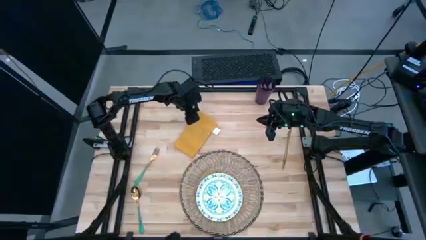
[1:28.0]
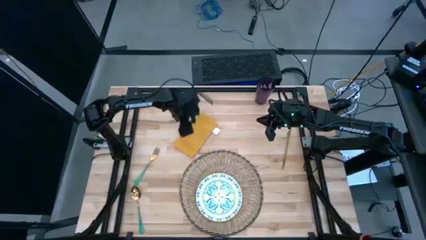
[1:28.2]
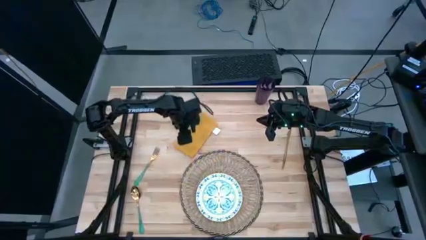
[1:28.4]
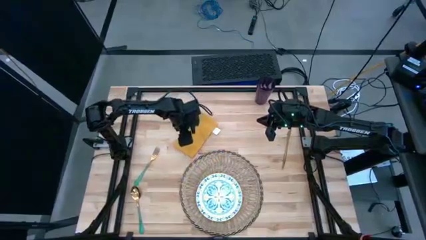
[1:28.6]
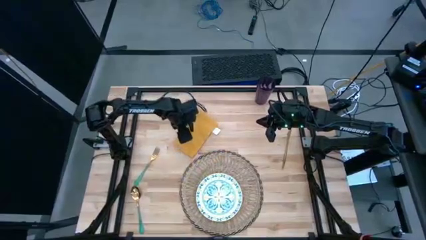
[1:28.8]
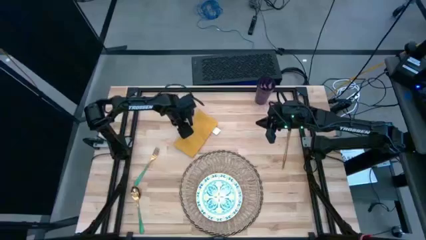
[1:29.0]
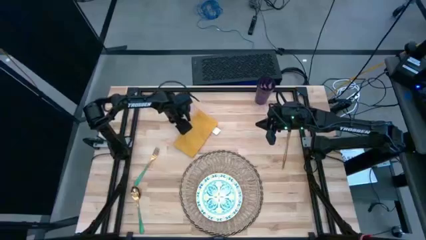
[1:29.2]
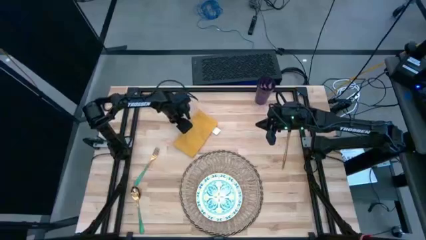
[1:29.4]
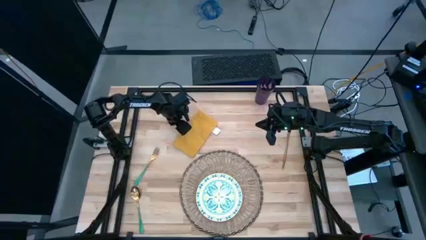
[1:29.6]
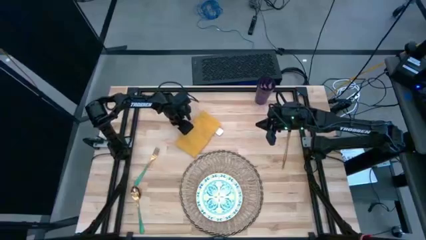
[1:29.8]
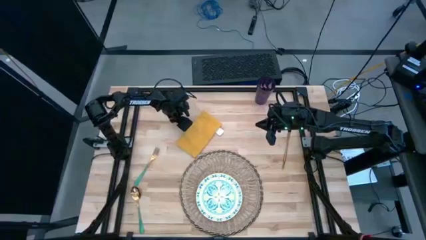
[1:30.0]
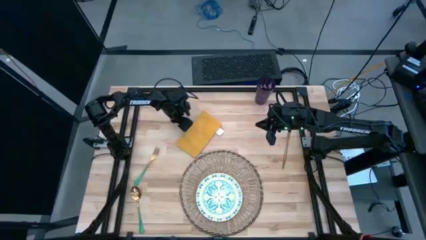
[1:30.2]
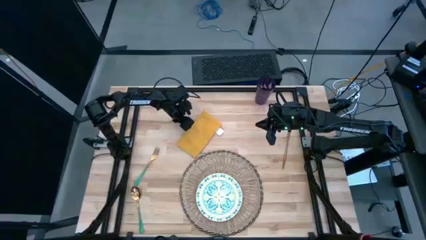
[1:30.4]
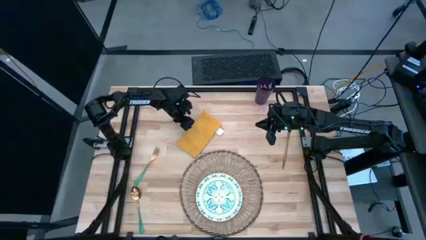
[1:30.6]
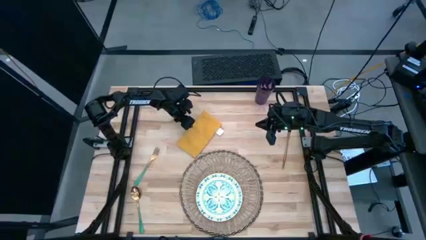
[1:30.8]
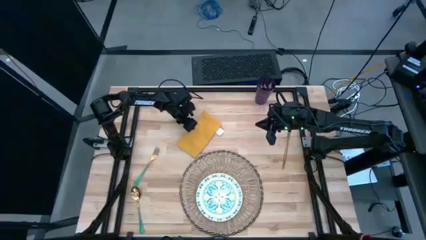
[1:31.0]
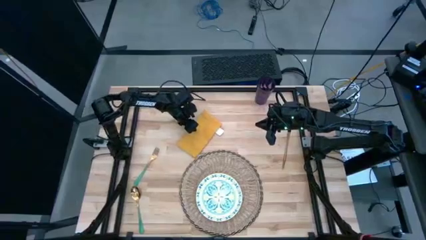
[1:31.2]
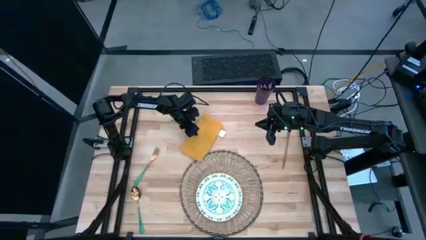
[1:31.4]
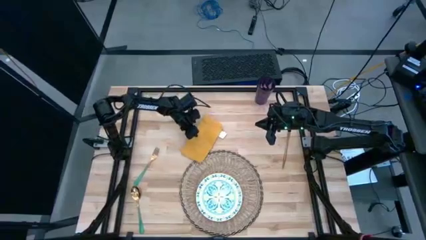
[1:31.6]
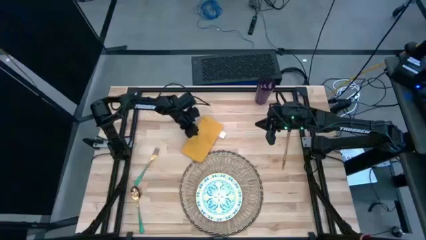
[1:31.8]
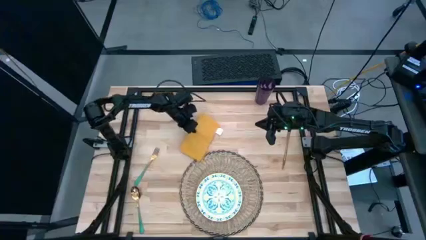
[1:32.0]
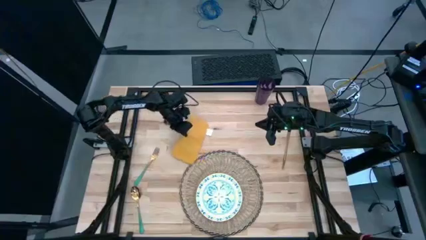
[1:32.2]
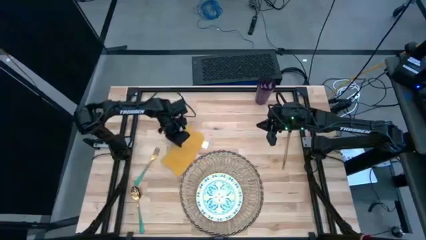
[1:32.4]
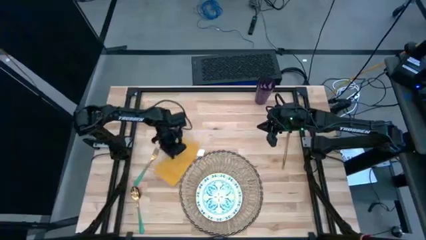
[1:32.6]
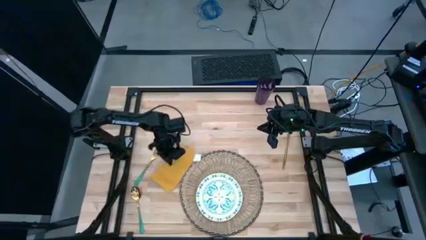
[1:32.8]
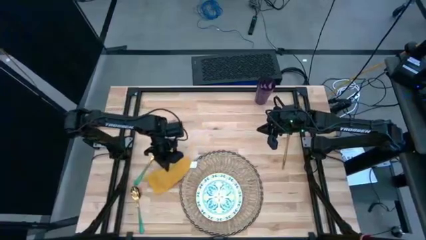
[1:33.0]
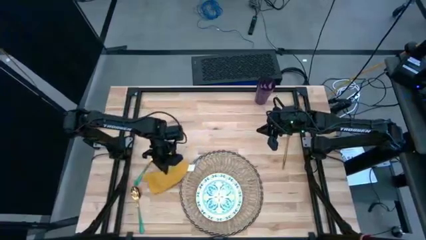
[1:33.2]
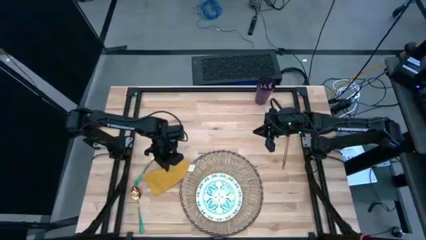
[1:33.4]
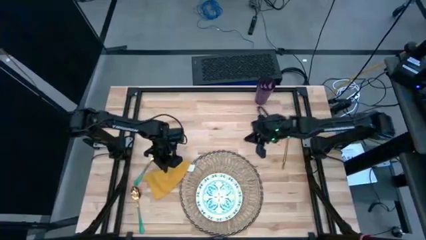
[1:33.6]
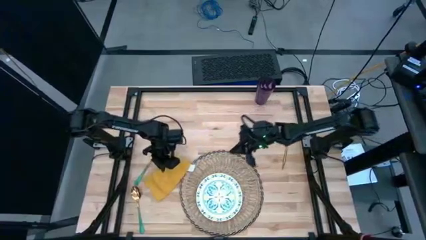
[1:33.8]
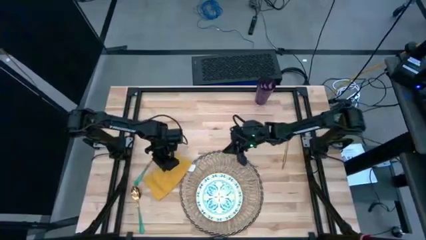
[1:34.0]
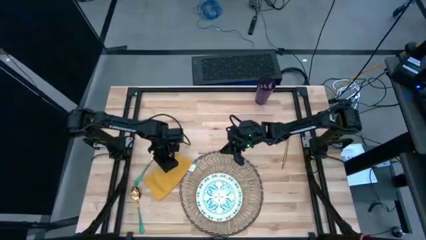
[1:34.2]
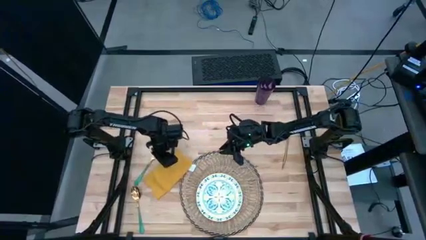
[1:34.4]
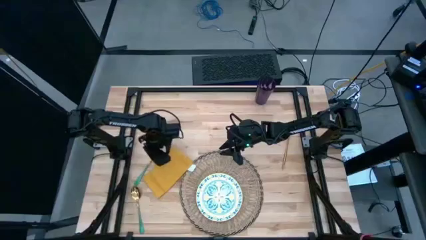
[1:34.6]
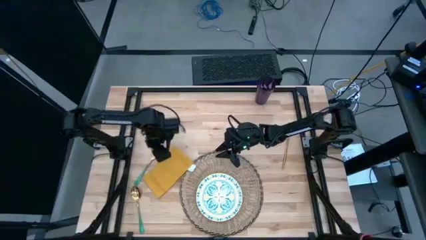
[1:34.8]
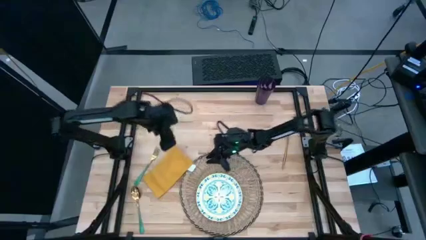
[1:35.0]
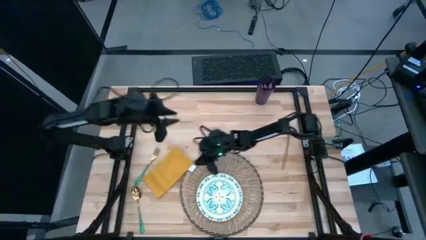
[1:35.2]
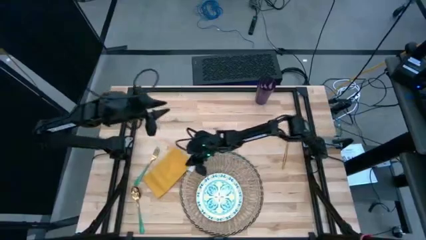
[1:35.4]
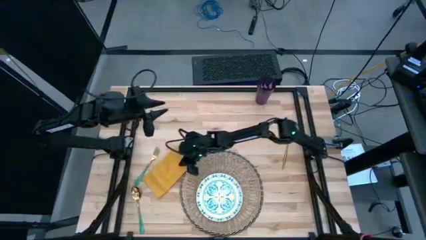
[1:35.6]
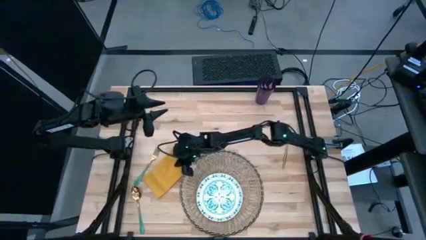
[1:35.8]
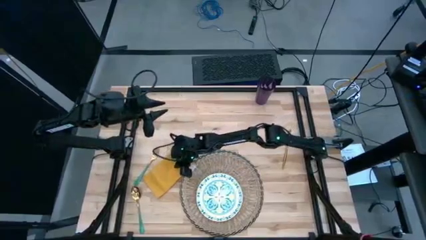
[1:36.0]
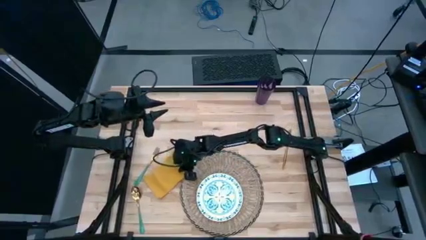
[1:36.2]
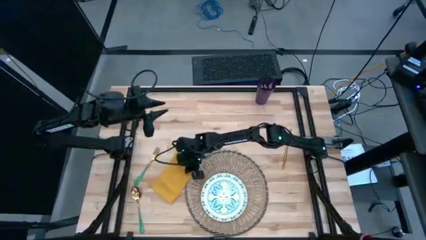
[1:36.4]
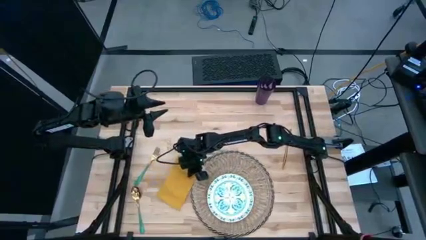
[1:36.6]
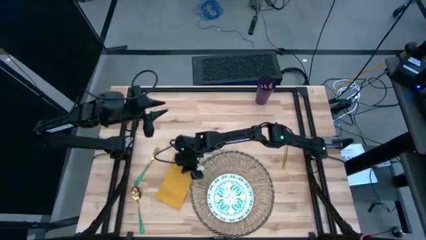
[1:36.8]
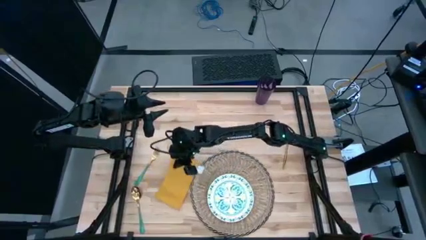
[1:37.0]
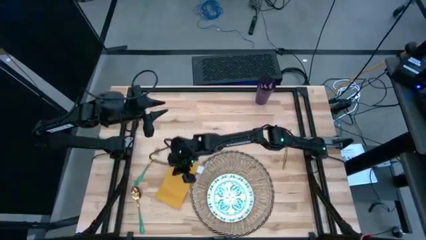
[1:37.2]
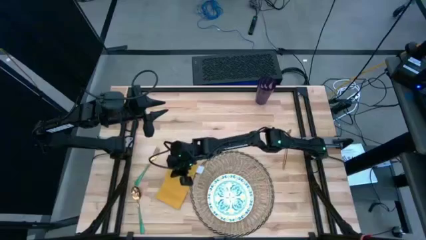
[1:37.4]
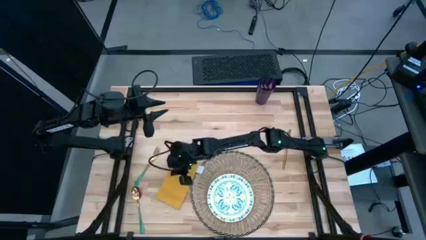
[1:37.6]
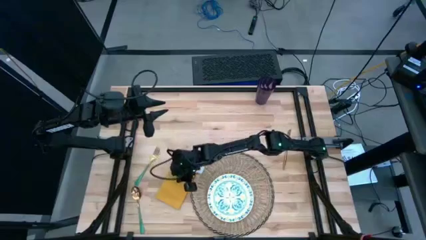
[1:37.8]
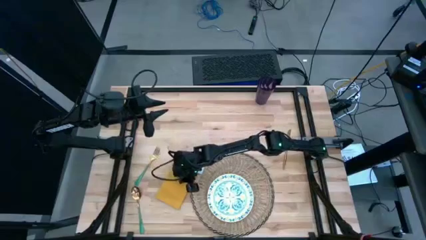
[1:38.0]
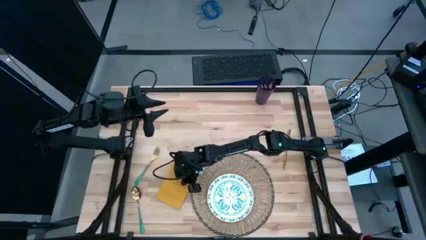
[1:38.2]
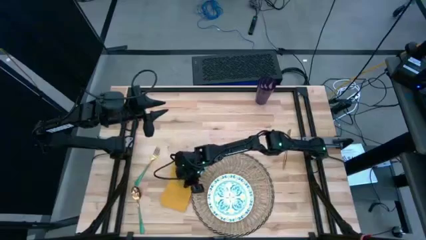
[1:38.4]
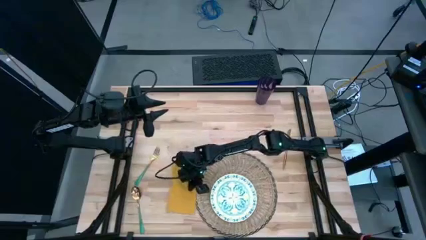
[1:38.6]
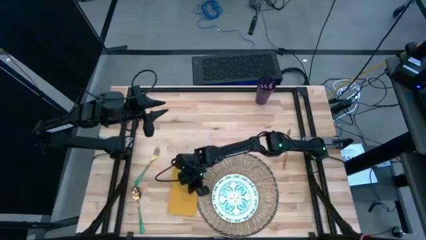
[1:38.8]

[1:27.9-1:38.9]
Task: Set table place
Move the folded yellow table napkin to the left of the brown placemat

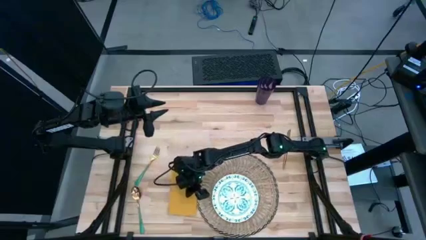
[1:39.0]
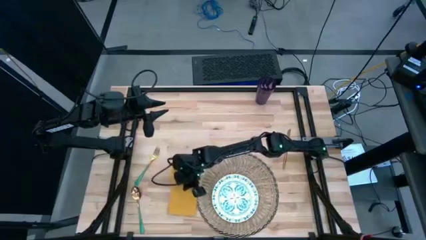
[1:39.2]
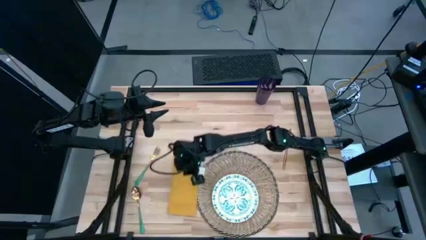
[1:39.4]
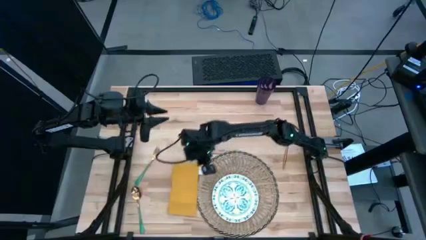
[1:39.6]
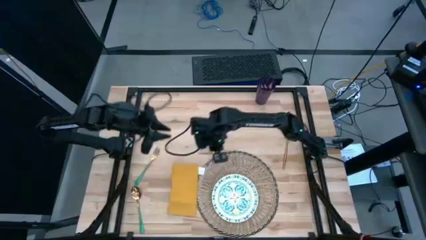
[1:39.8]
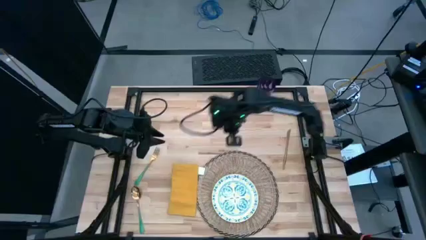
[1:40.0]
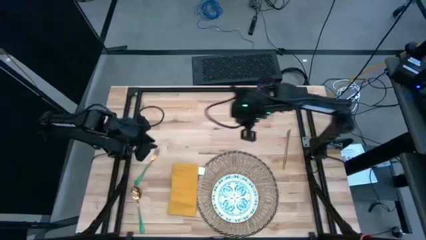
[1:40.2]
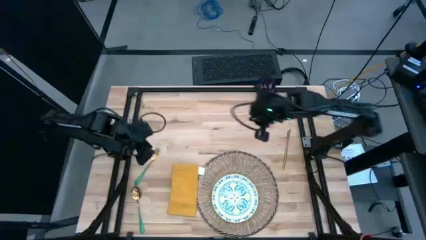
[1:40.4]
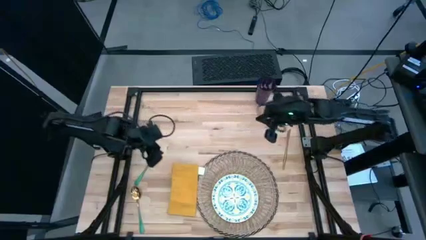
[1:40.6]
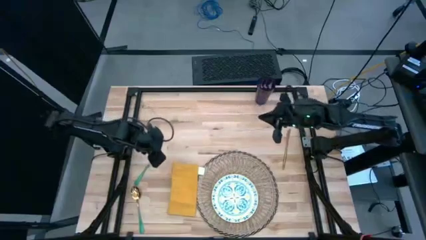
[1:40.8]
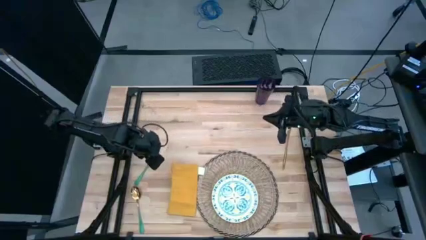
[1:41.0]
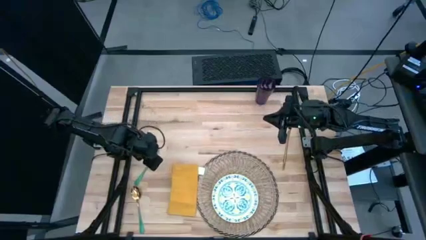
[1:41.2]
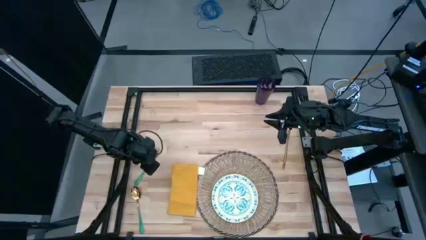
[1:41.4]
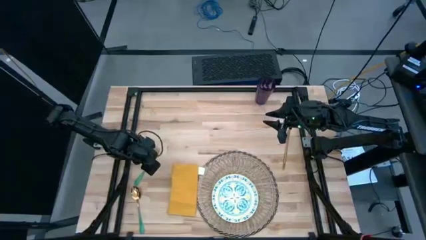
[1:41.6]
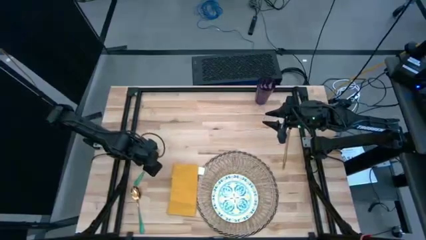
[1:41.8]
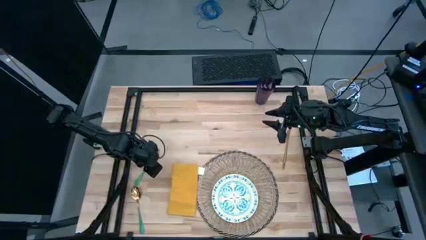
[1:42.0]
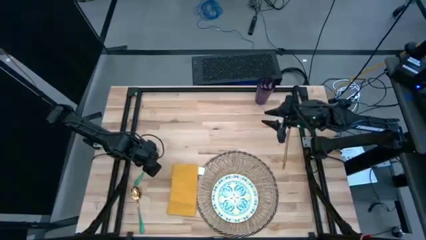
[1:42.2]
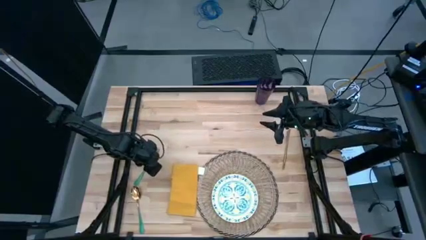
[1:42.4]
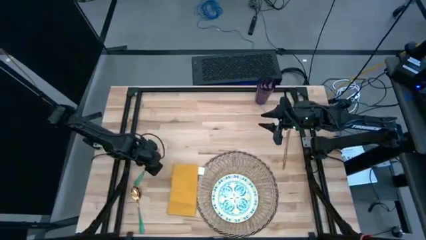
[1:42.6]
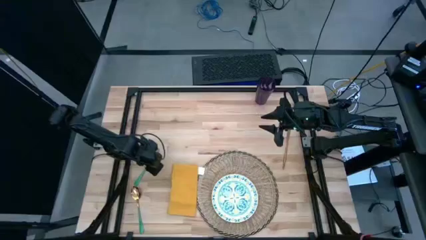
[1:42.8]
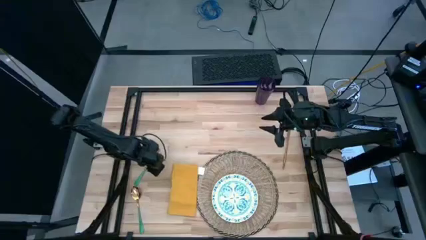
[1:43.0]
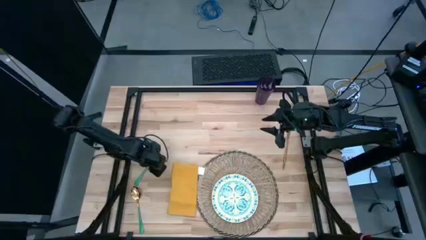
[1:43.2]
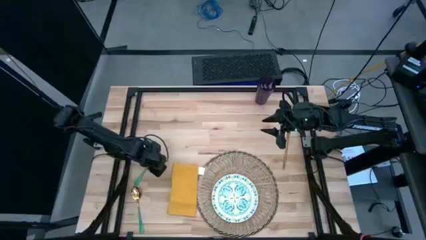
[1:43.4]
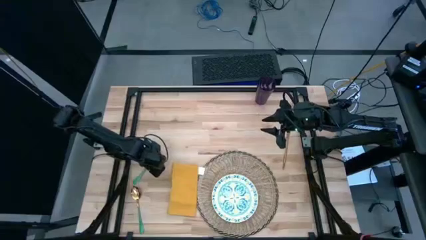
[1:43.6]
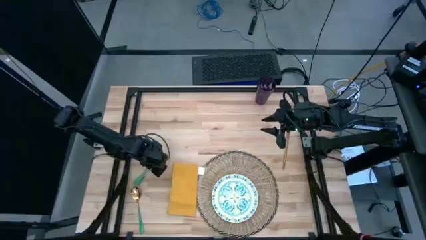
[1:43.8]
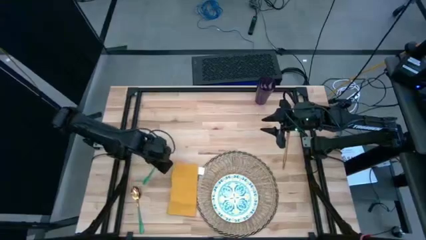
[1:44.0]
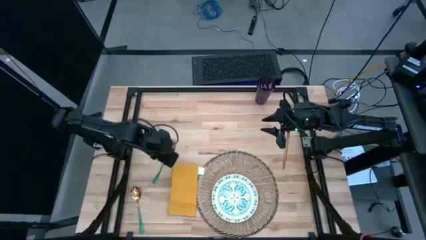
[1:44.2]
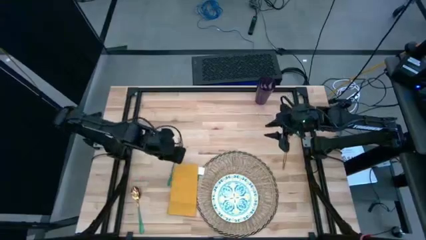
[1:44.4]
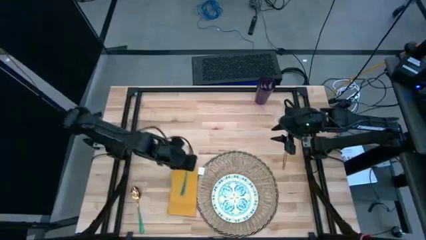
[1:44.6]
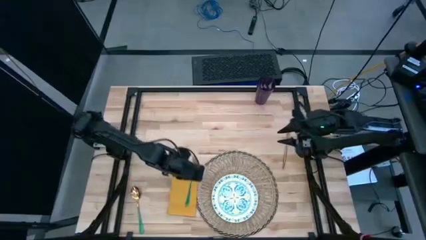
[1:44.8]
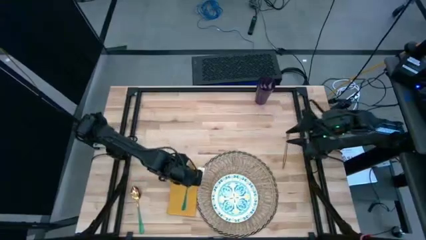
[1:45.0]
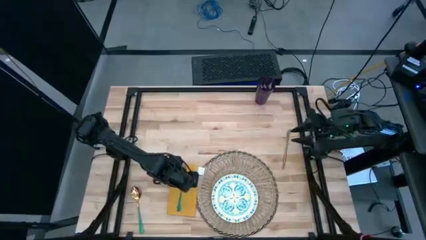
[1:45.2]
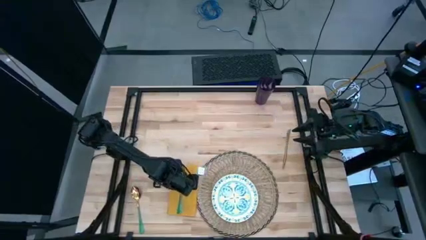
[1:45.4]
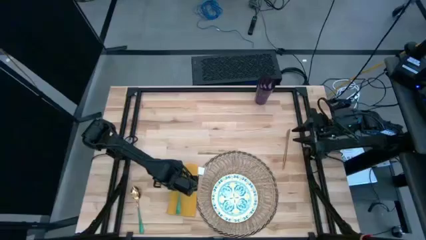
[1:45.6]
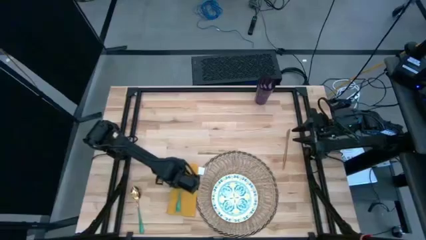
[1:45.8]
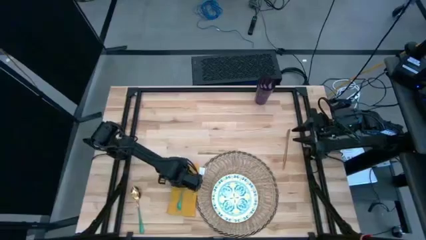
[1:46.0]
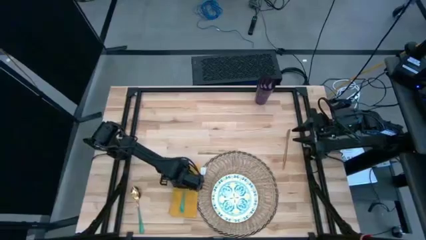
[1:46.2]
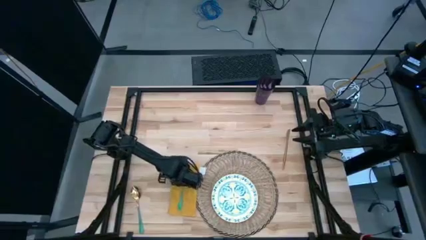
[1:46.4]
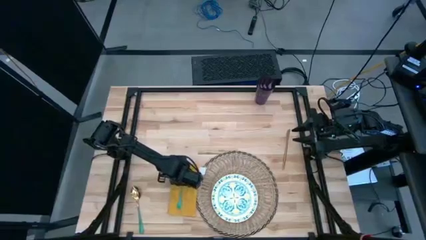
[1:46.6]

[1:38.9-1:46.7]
Put the green fork on the yellow table napkin
